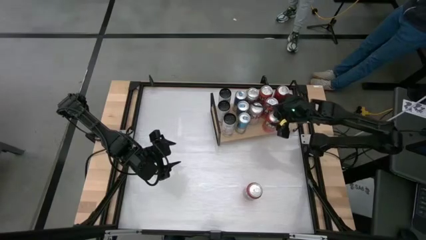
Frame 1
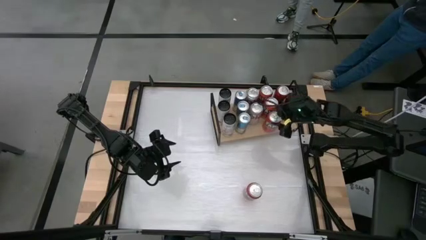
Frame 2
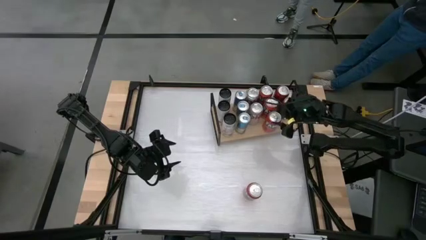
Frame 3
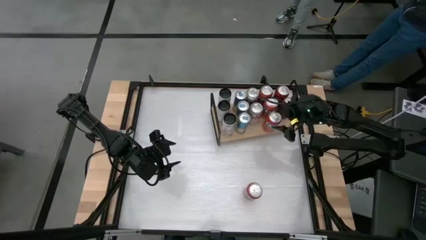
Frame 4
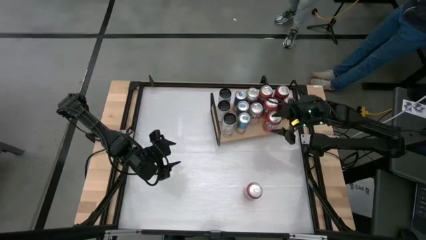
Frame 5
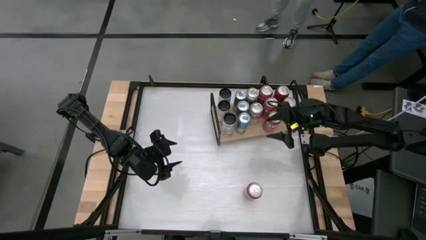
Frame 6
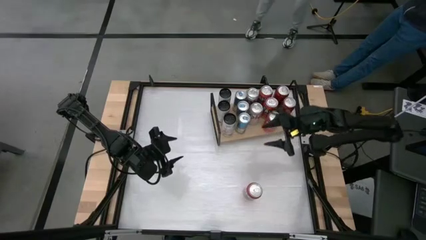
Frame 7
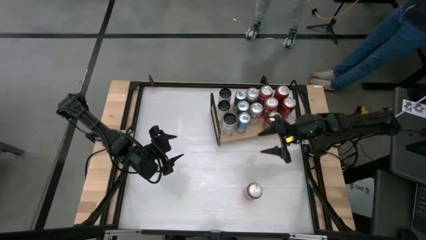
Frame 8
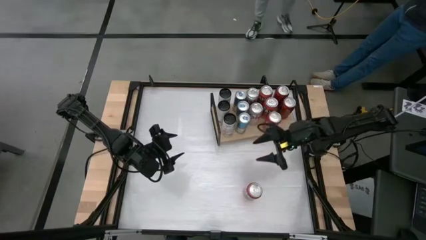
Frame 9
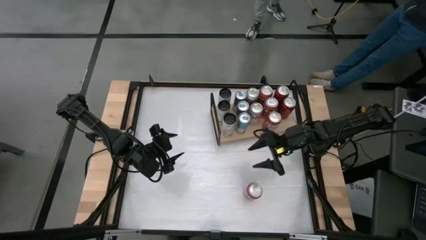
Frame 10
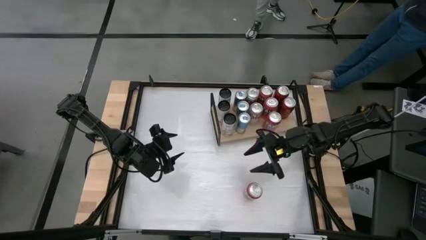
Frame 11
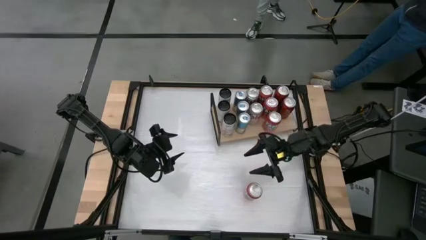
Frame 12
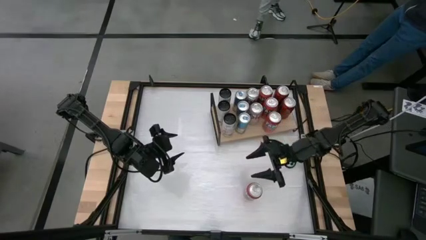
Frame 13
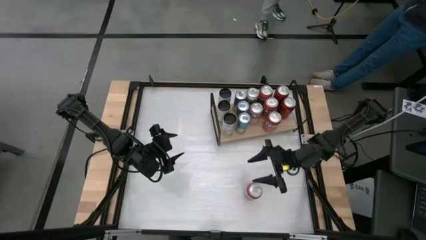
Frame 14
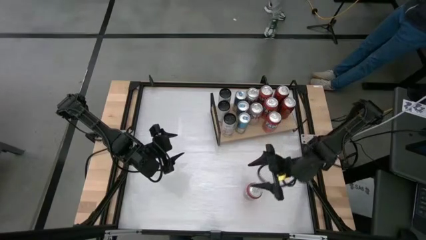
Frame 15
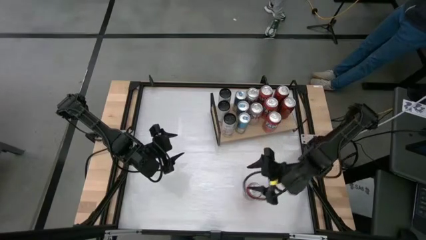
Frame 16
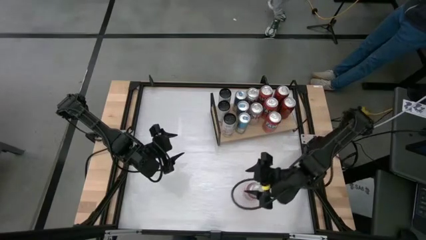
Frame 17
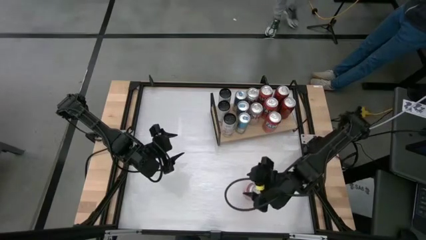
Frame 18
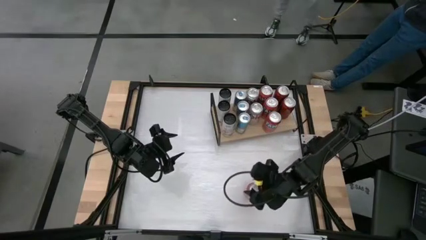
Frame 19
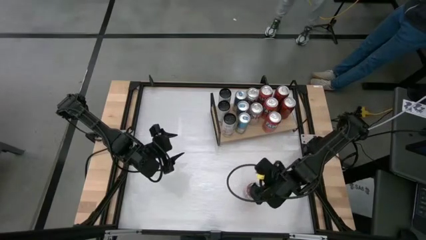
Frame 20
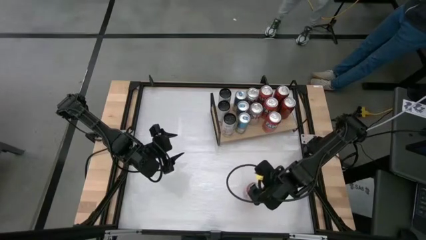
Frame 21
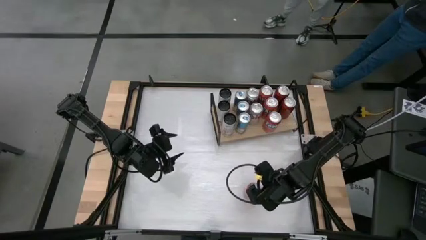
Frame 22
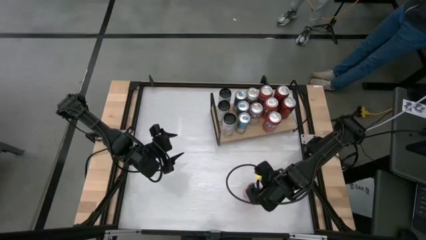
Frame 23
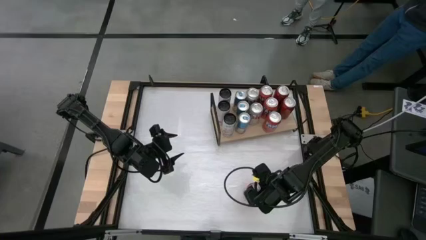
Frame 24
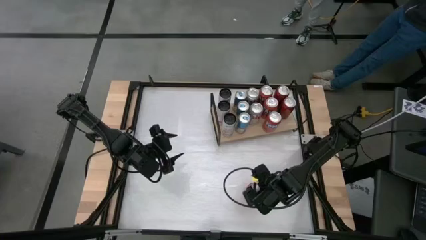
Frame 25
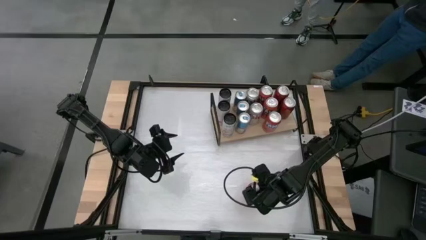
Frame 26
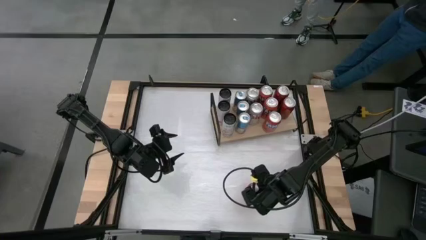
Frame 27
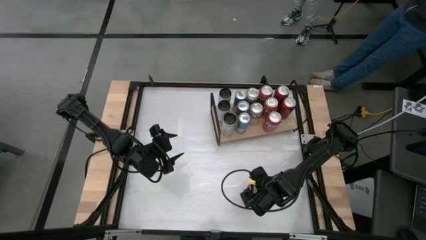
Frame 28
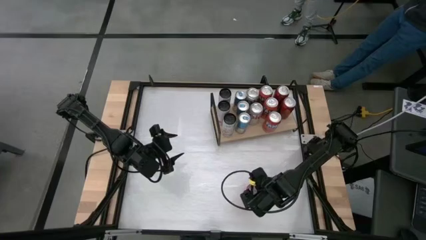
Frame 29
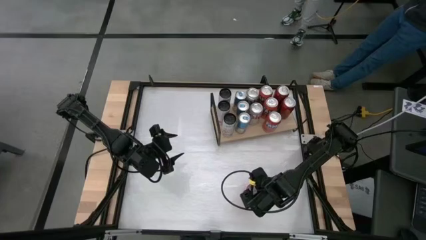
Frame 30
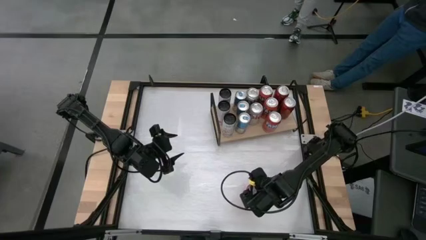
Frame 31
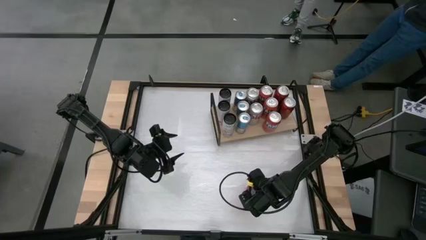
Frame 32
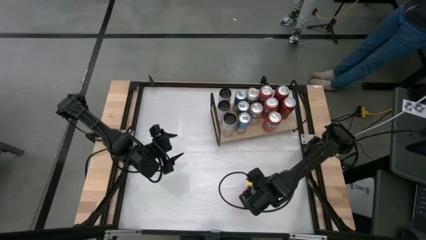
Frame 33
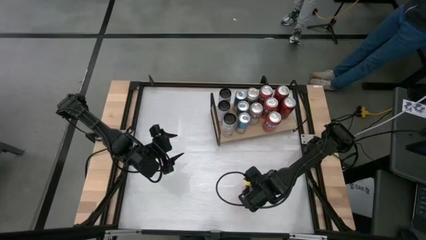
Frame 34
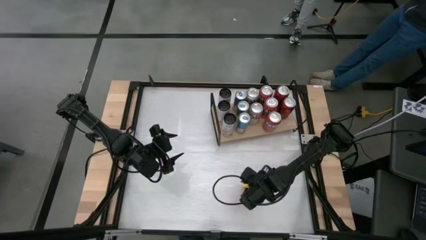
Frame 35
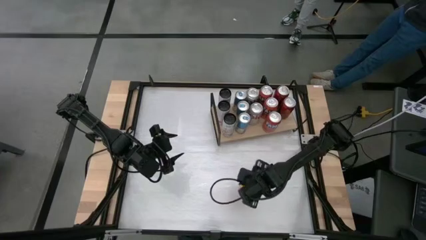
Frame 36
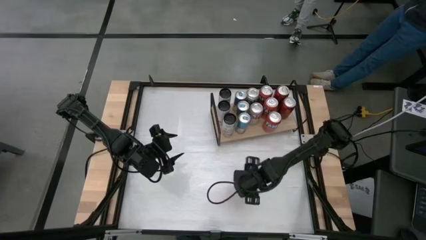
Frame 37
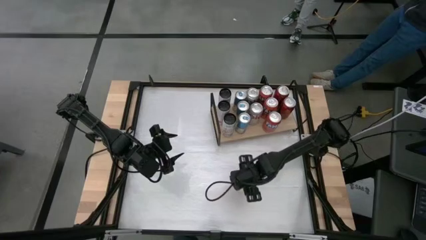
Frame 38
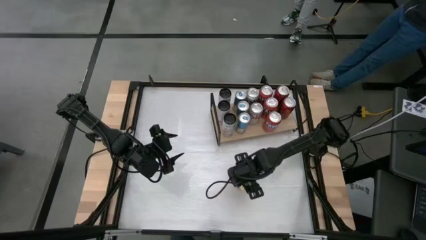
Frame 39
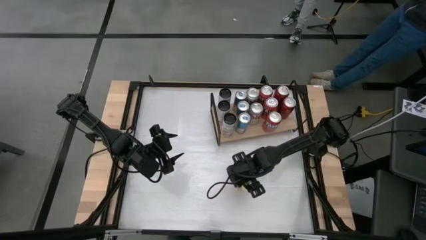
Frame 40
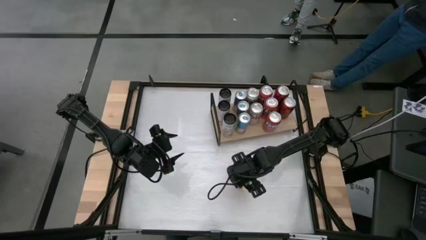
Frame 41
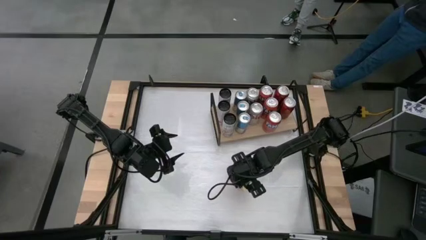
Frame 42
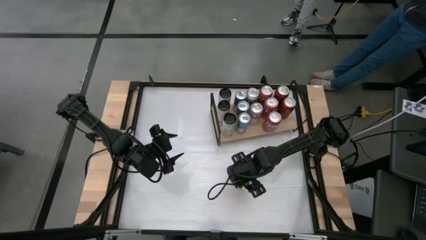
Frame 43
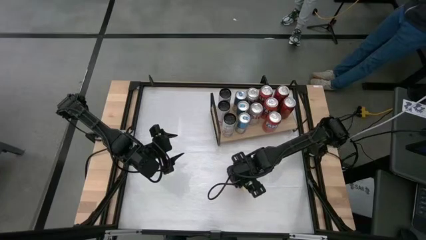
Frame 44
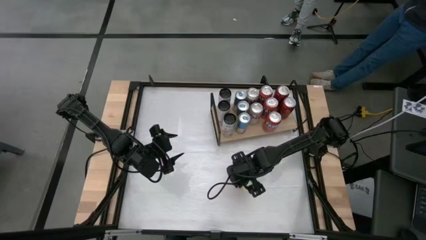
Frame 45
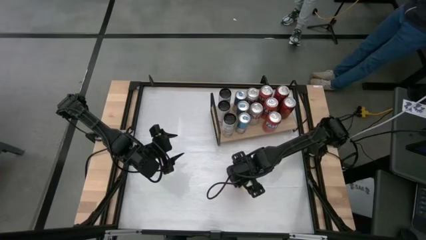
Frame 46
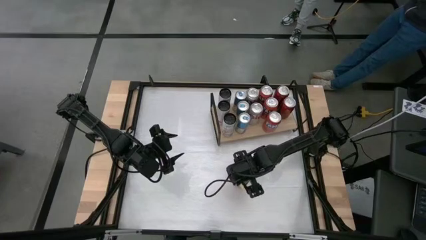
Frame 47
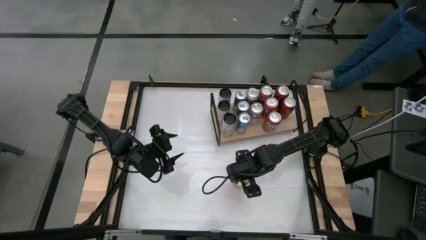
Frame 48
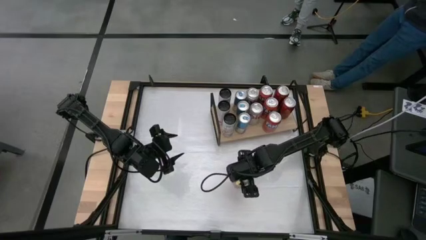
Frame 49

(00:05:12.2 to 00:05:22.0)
Task: Place canned beverage on shelf
Put the orange soda can on the shelf aligned with the red soda cans

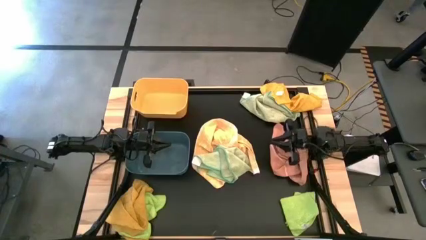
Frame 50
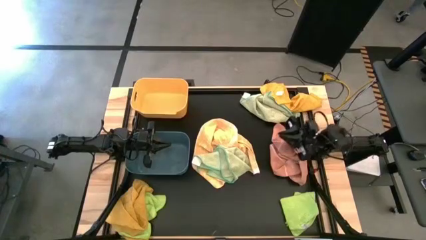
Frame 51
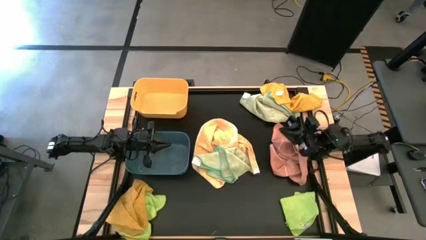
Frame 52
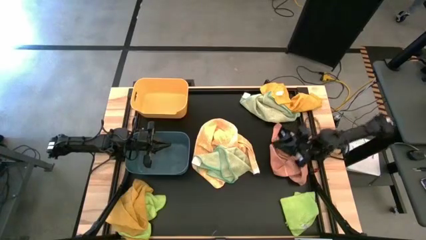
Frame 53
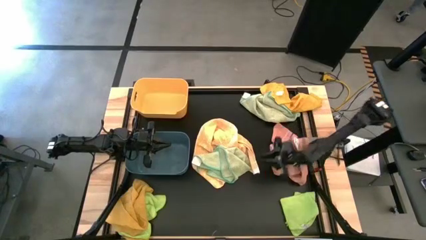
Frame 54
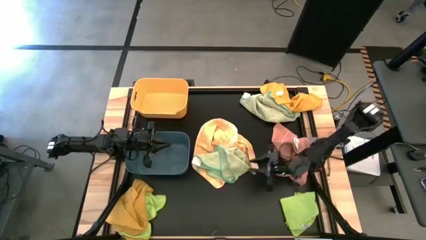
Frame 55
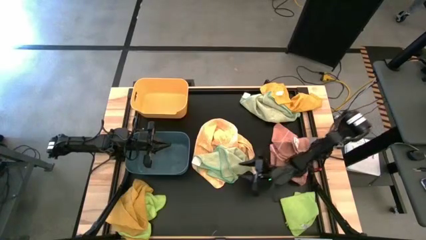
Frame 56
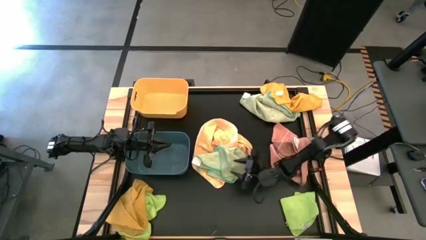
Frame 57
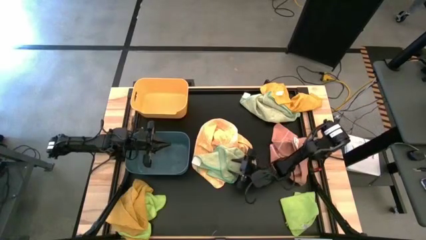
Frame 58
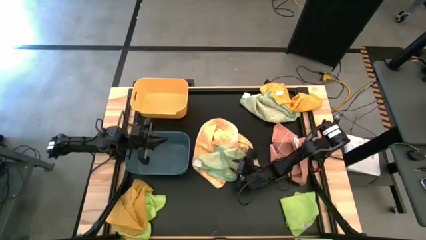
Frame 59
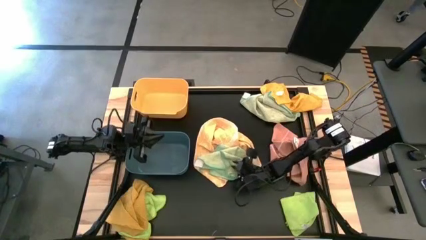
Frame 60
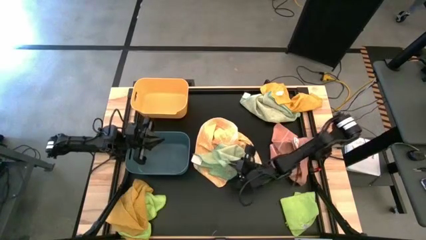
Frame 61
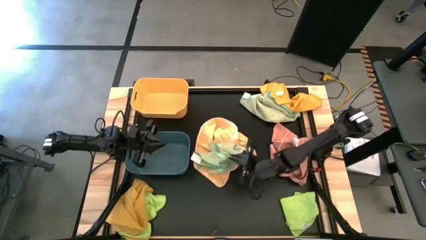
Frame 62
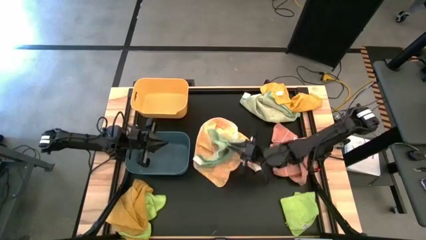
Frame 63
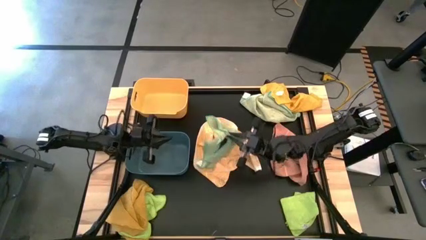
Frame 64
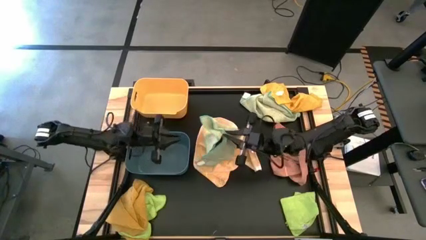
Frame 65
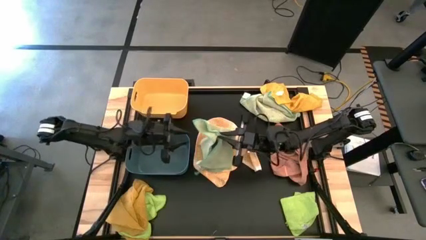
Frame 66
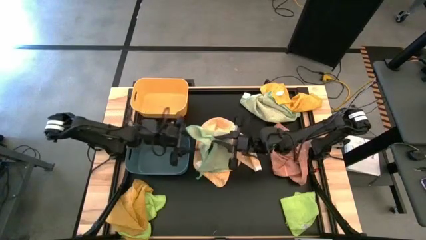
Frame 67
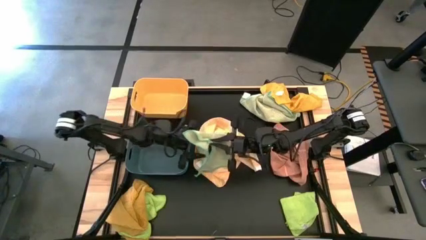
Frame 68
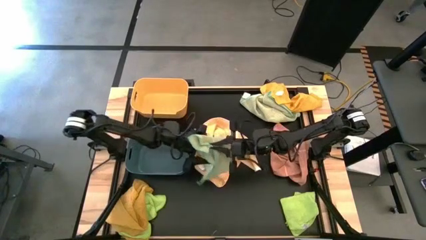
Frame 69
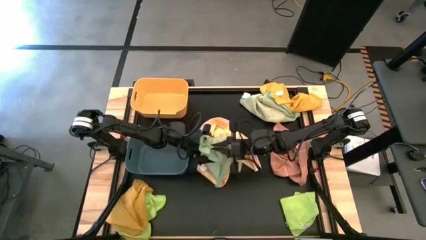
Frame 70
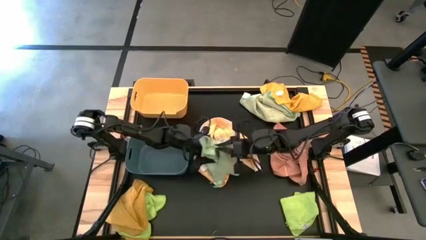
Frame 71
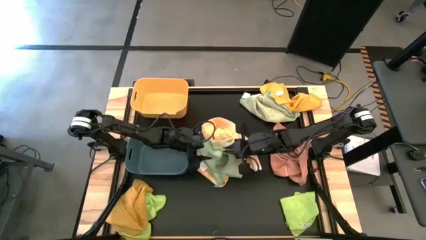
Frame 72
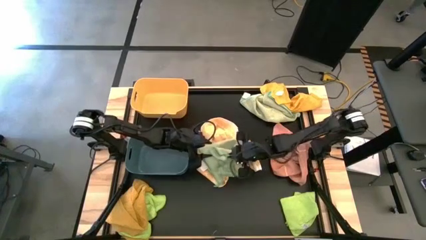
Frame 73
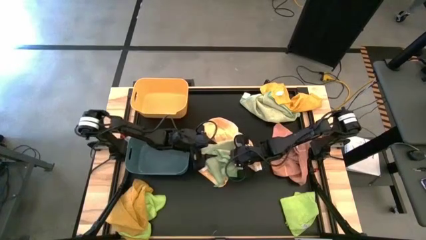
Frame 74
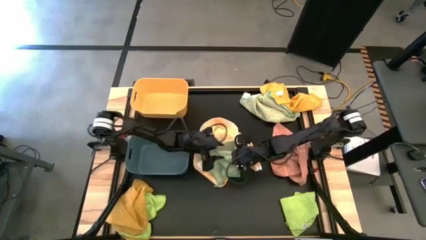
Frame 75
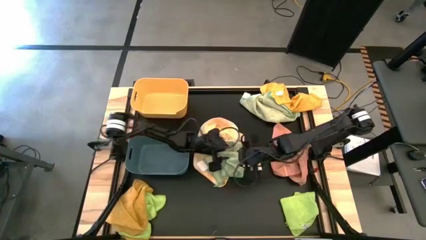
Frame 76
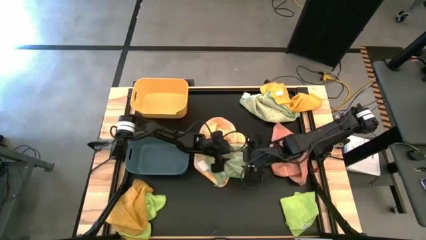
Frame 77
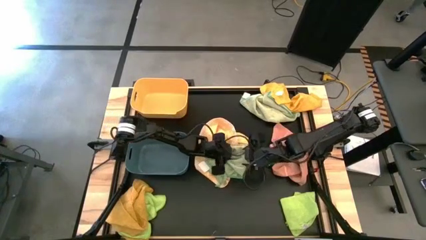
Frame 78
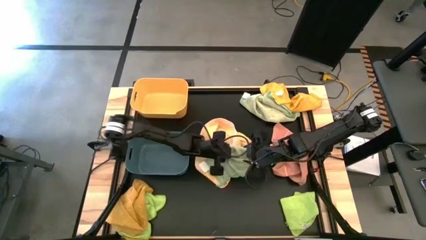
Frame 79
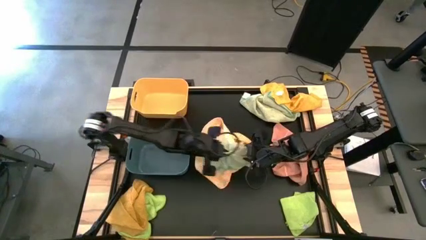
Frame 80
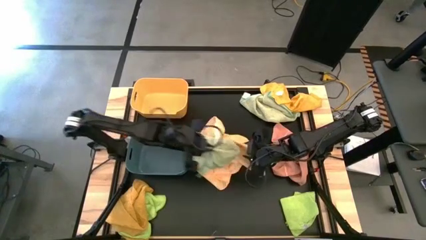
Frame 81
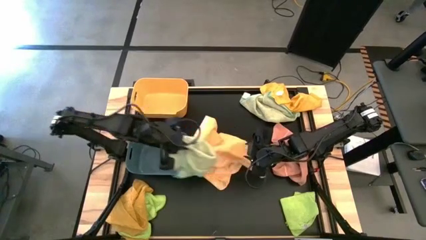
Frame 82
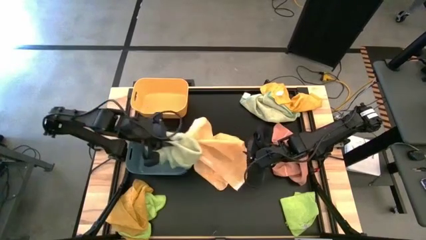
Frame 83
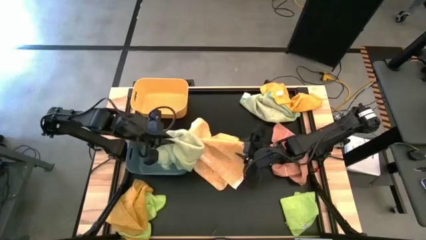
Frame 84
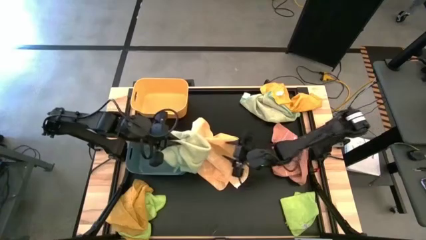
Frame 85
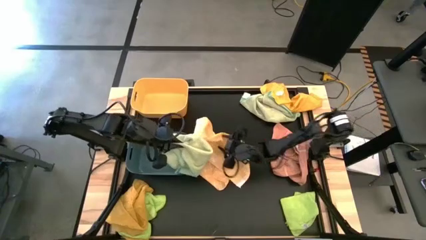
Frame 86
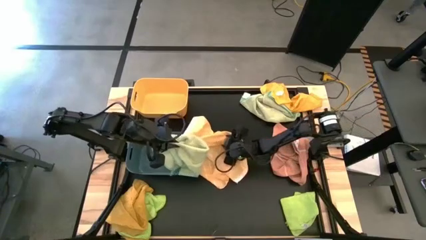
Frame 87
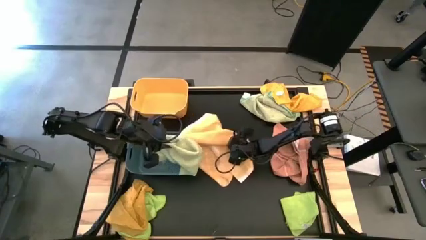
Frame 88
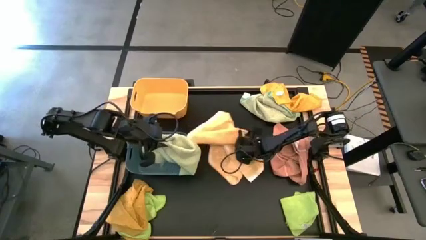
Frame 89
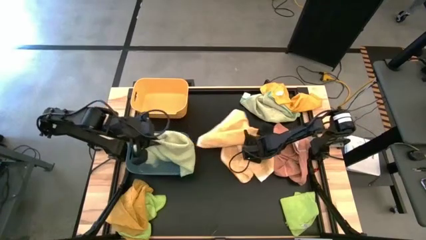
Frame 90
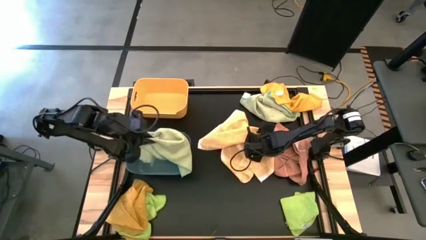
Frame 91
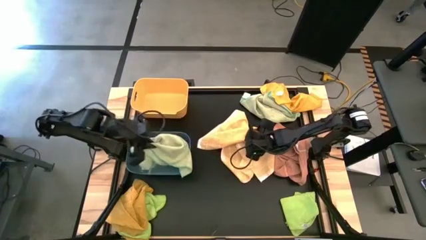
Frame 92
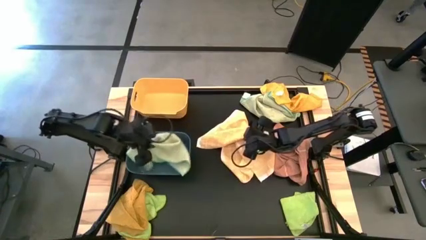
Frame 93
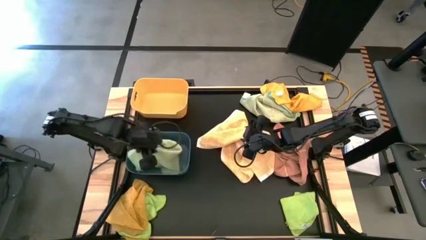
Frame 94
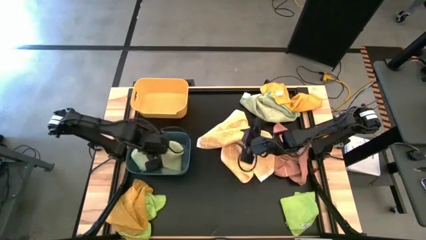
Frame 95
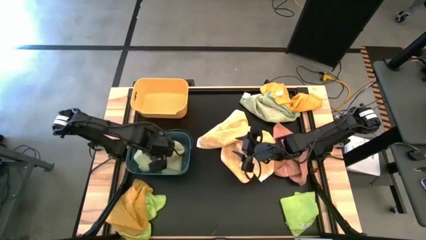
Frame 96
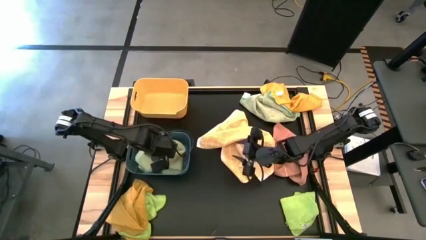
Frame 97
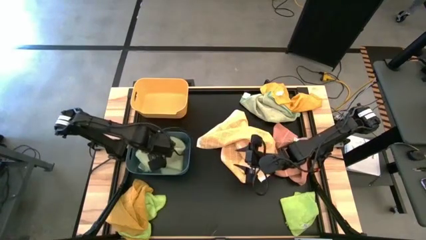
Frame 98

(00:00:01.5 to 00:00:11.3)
Task: Sort microfiber towel by color & place in baskets
Put the bottom light green microfiber towel into the blue bin
